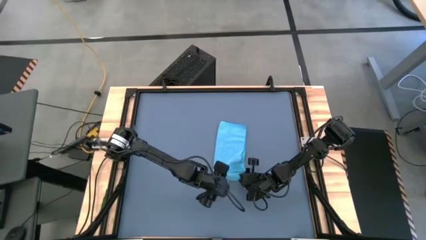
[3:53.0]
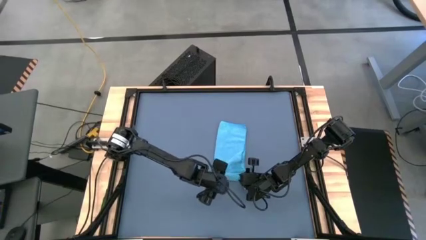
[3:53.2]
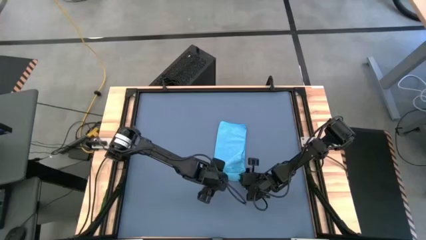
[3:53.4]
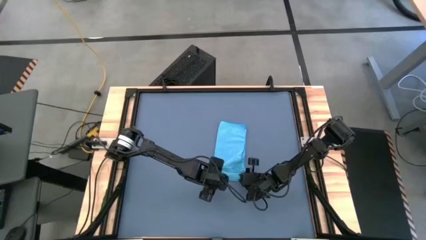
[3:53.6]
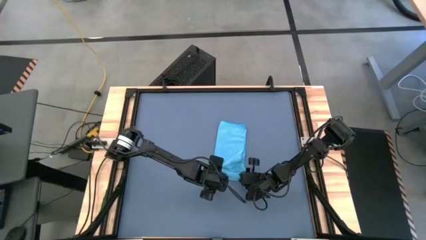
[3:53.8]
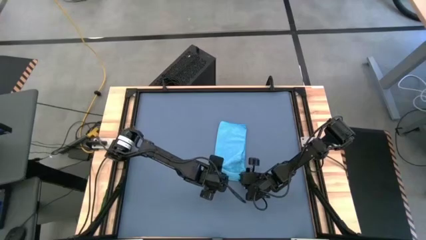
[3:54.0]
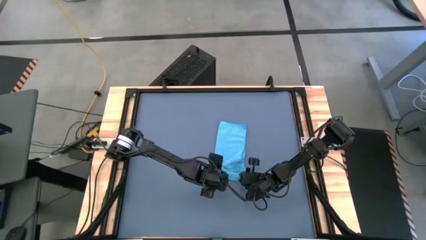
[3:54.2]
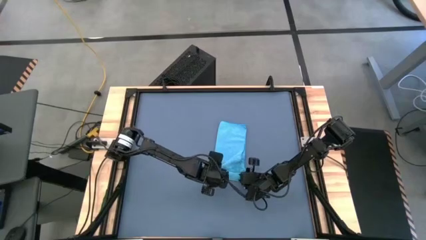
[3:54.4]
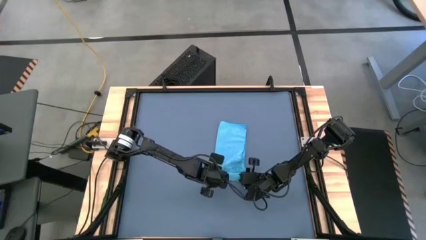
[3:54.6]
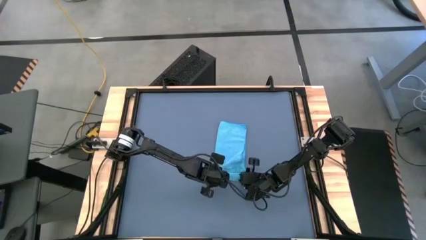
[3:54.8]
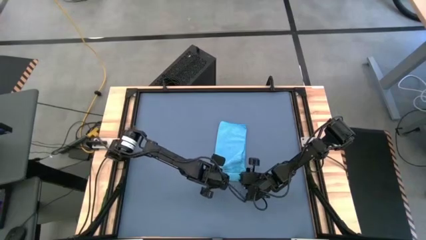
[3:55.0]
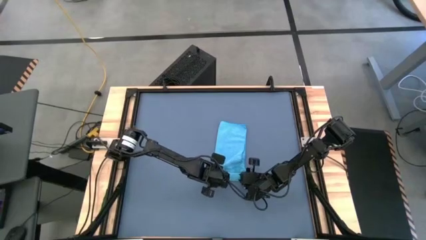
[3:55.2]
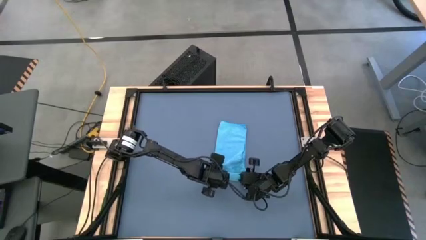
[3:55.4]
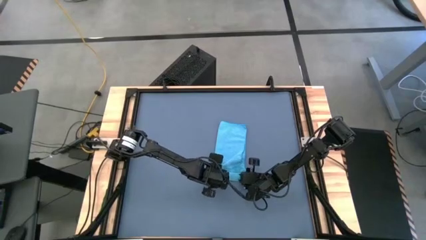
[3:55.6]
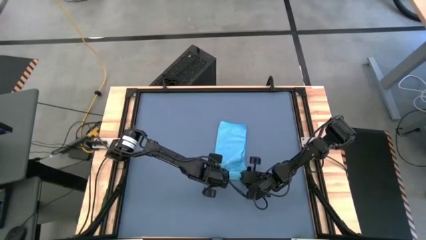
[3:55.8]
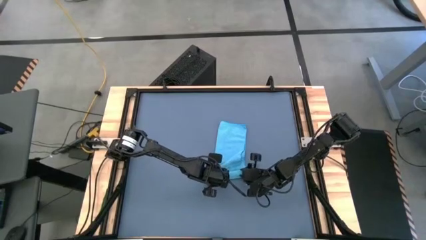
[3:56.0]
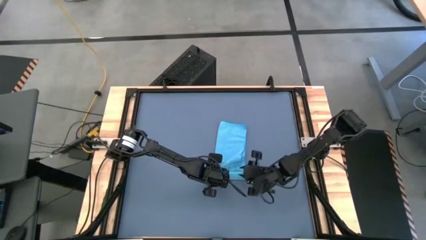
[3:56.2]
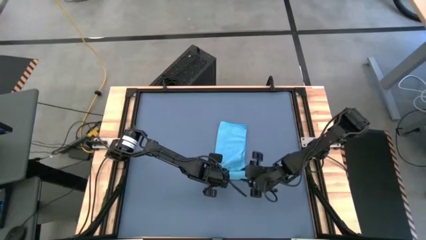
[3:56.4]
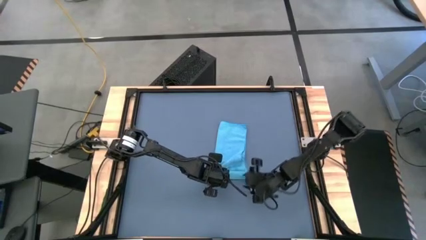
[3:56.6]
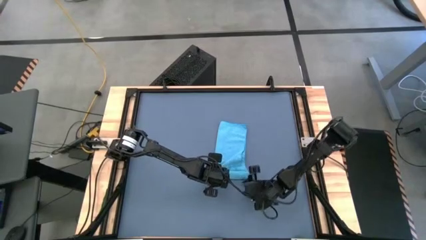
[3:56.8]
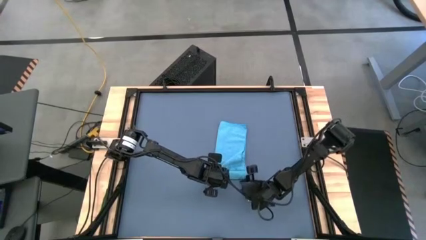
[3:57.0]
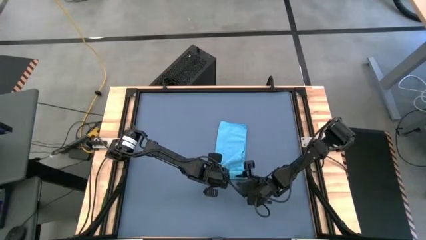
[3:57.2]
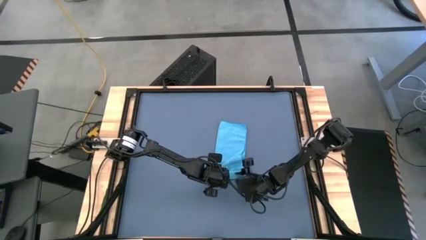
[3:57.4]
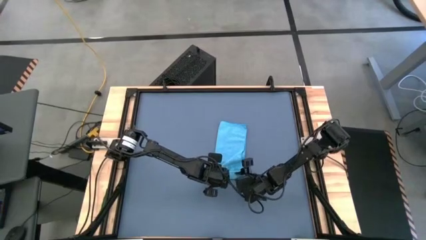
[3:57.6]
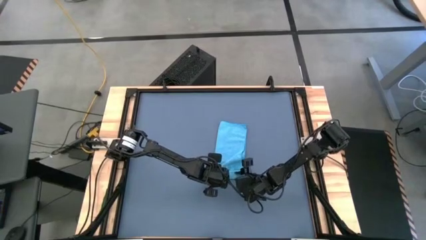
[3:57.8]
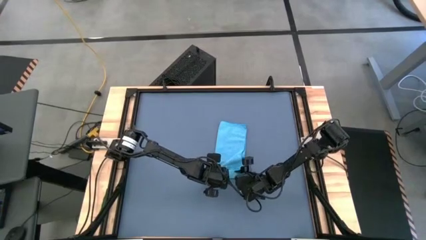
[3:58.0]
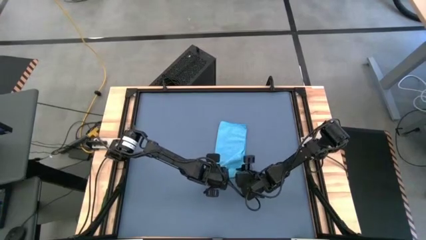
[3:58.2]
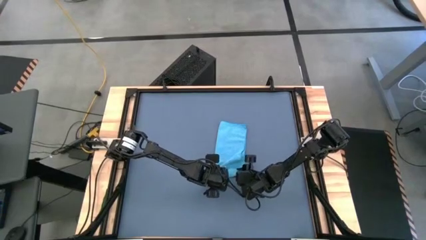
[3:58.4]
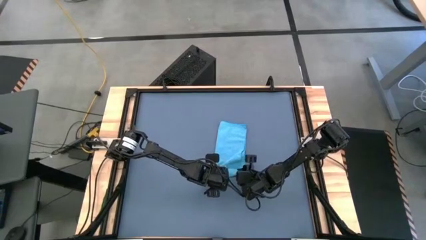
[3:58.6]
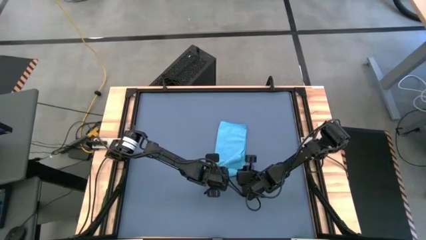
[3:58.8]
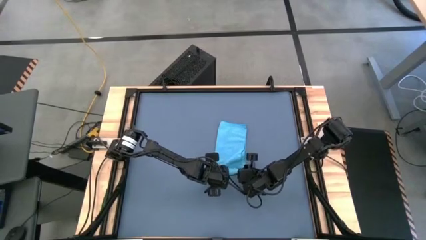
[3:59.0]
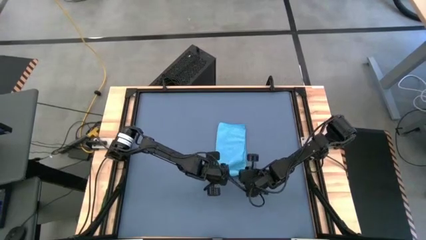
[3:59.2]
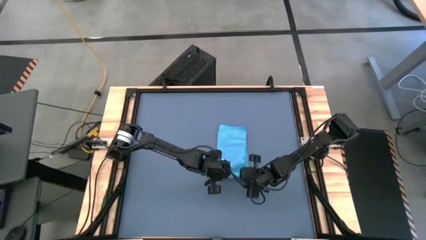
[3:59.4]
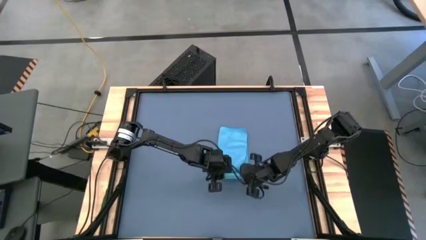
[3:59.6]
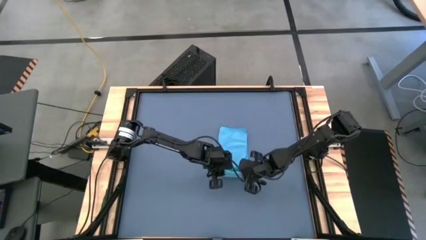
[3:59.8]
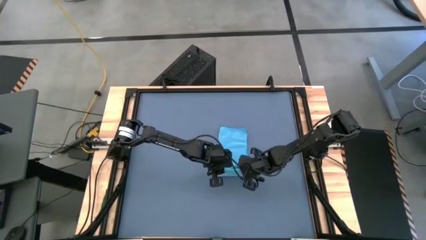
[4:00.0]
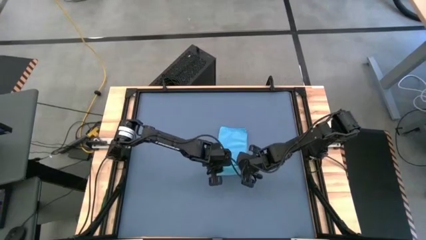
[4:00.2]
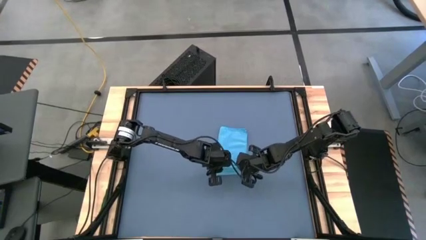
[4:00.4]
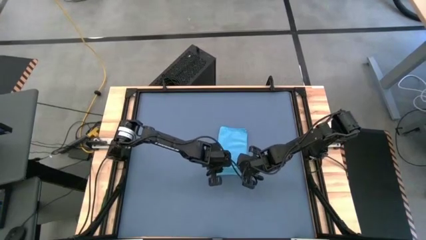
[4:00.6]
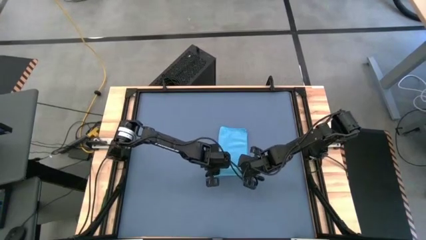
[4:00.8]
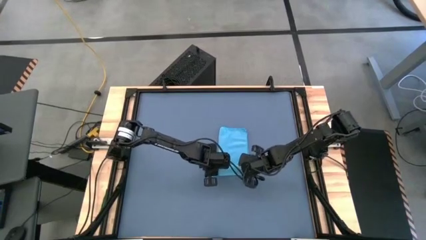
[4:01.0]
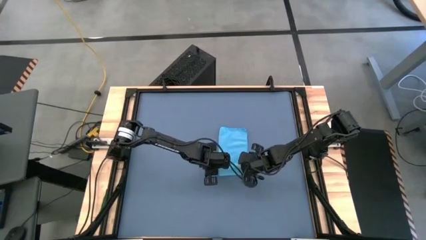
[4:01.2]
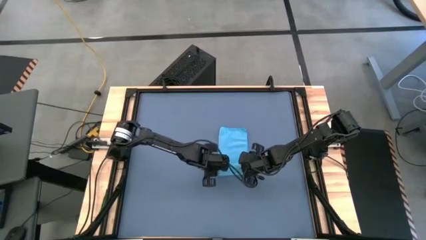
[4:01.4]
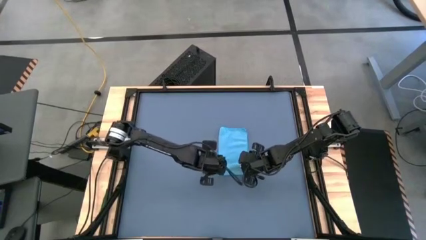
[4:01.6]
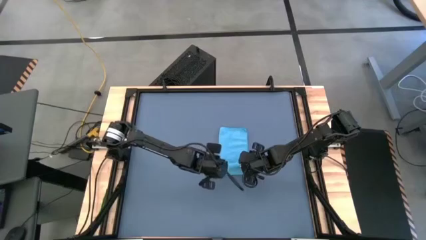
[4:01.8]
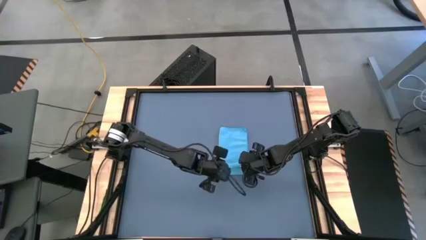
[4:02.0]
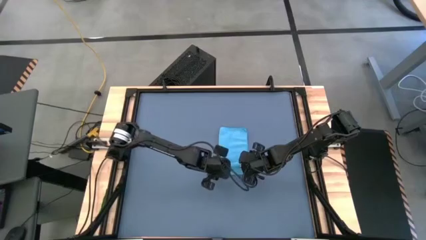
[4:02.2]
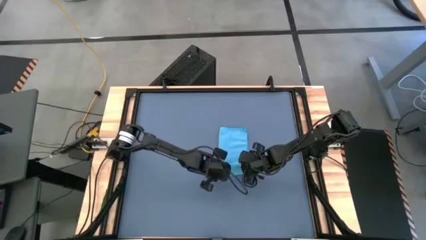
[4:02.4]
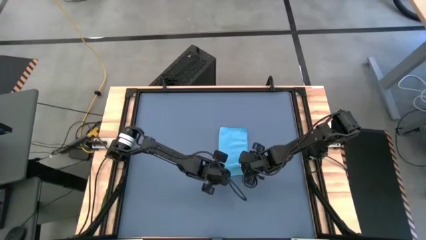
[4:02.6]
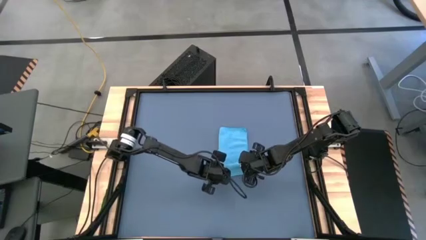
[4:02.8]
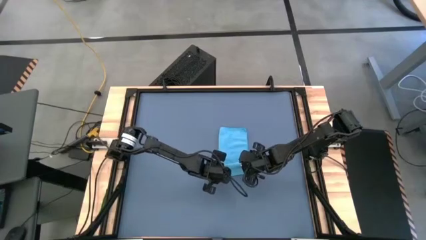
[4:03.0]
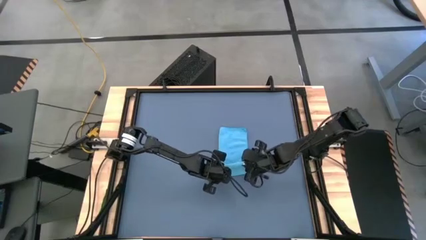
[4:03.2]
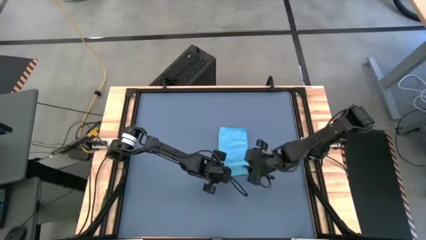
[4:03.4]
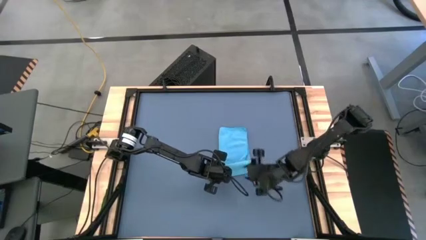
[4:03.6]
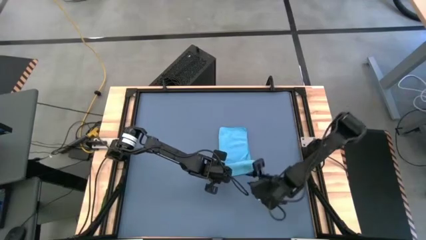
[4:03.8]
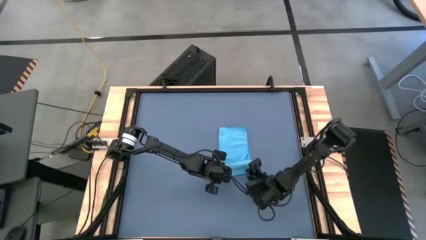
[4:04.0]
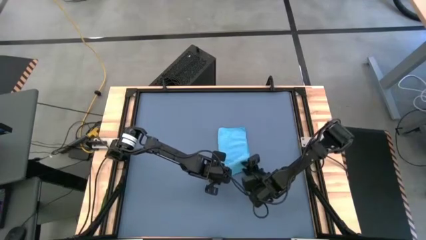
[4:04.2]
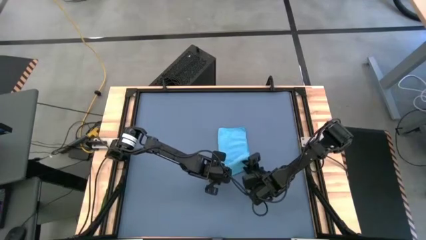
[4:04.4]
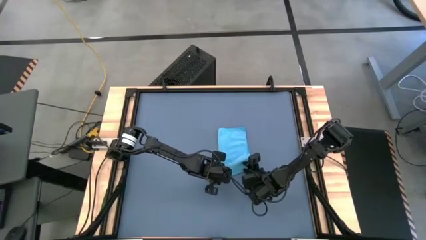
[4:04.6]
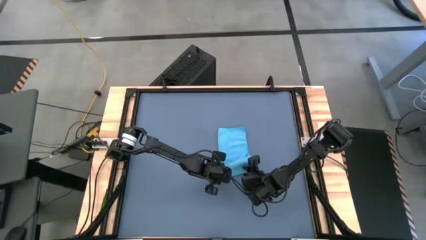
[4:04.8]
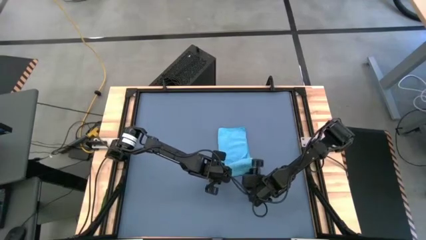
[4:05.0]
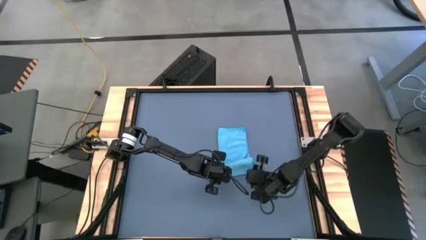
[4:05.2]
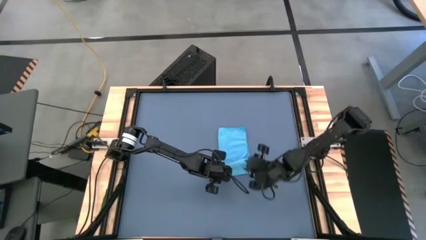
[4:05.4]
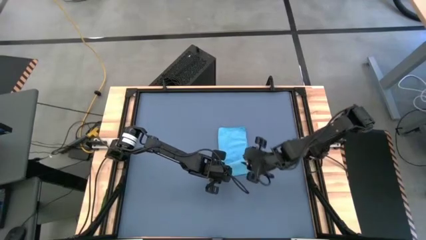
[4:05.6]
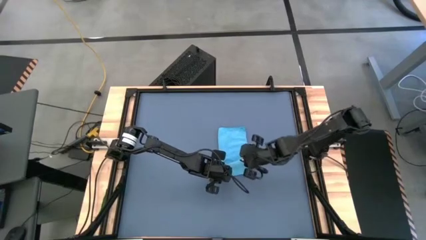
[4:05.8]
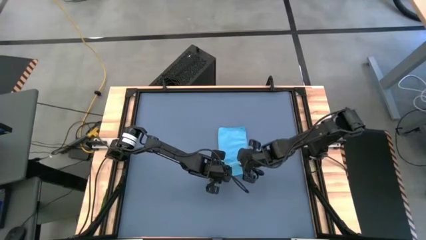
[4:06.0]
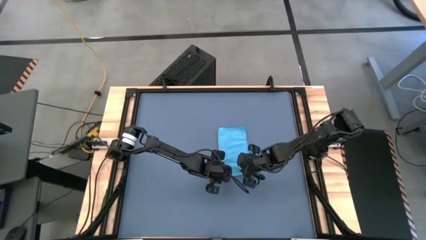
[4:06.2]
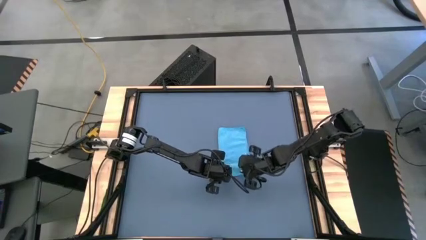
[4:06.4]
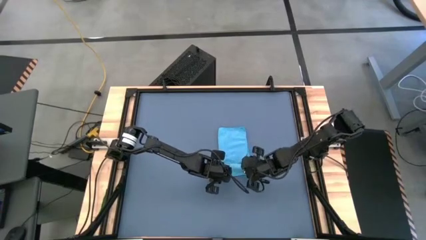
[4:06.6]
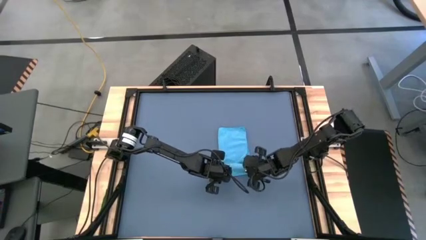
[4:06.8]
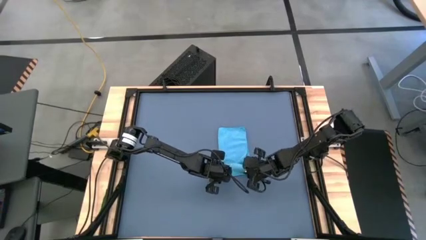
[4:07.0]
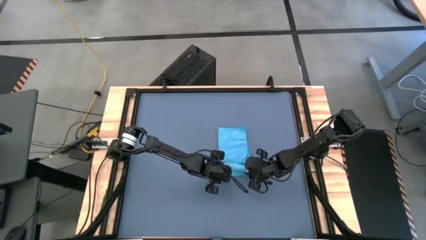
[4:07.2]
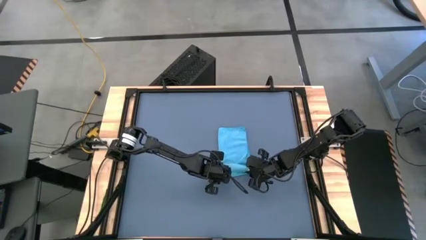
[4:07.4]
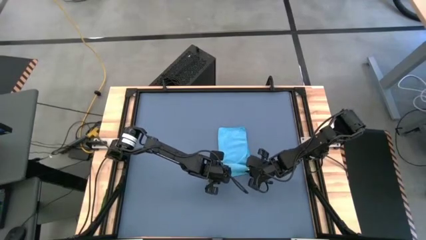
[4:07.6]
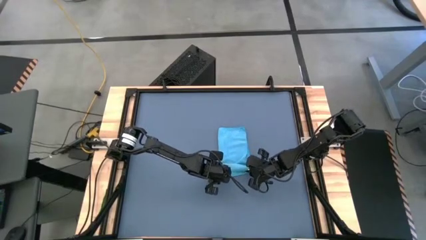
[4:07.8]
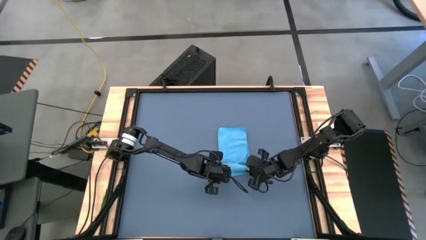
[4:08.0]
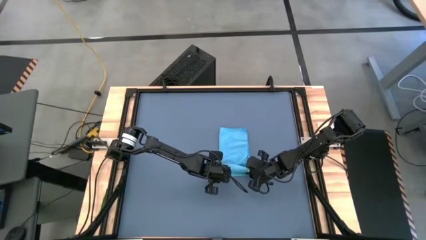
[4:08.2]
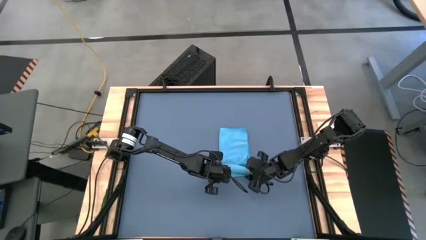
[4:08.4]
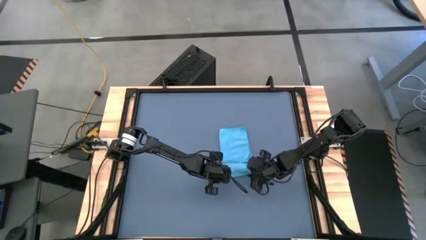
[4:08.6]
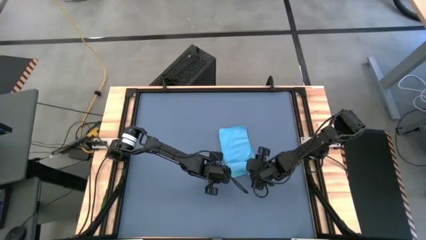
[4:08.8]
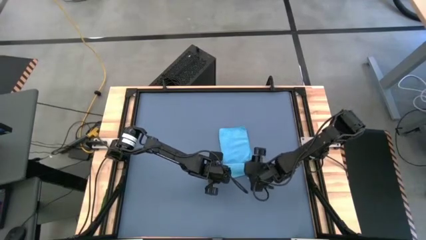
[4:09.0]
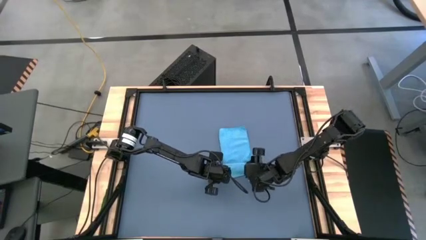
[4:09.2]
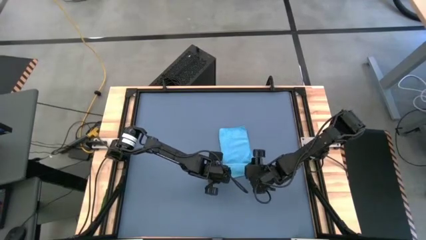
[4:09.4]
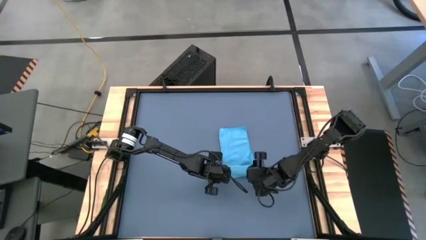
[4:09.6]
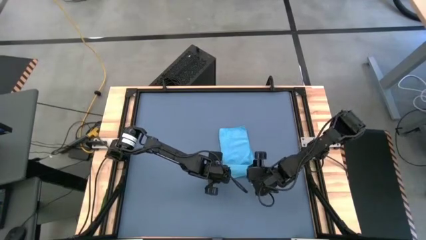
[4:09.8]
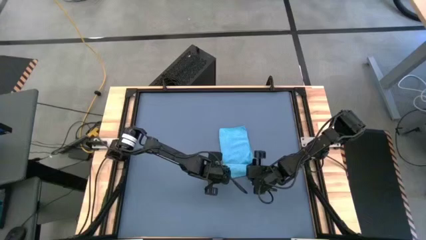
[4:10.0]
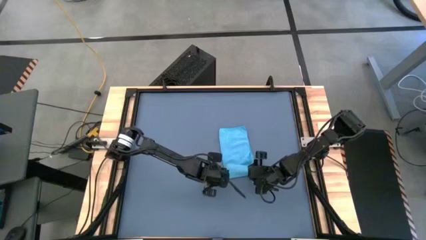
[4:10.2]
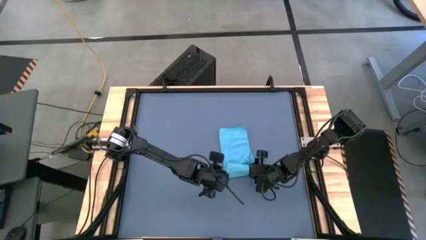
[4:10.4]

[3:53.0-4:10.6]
Task: Roll towel
Roll the blue microfiber towel
